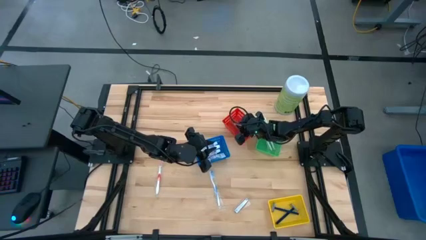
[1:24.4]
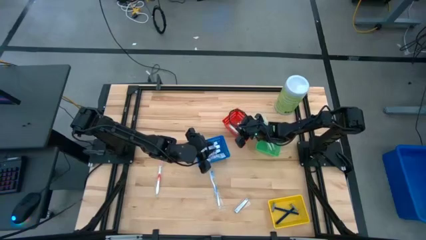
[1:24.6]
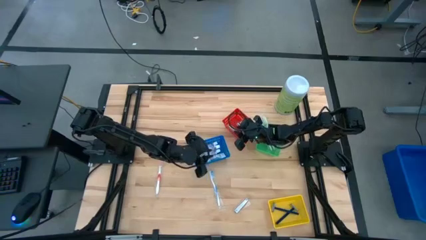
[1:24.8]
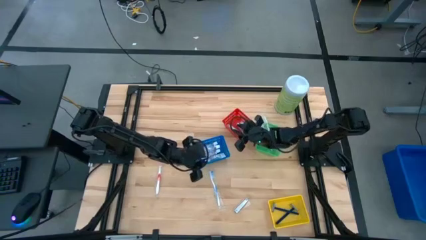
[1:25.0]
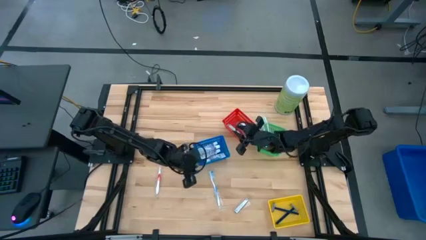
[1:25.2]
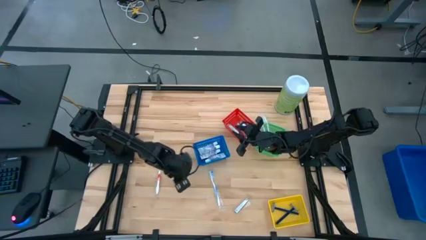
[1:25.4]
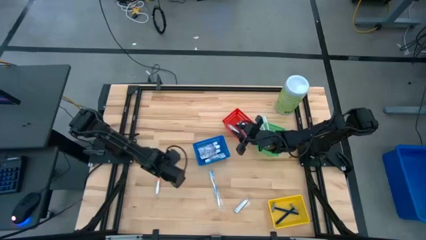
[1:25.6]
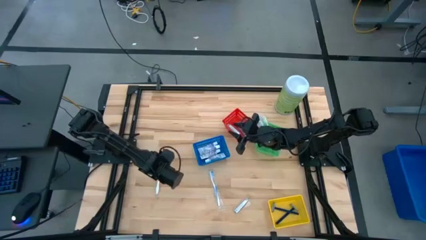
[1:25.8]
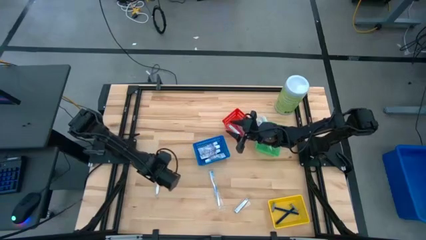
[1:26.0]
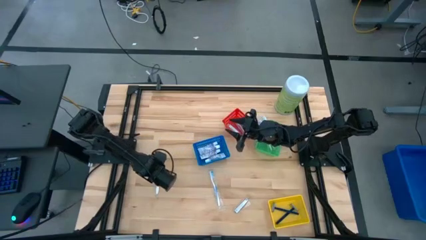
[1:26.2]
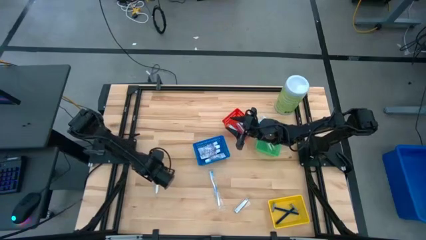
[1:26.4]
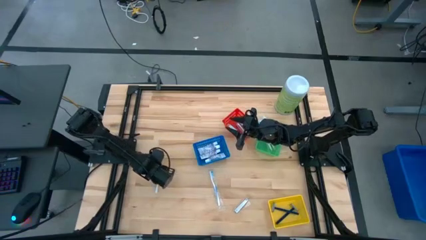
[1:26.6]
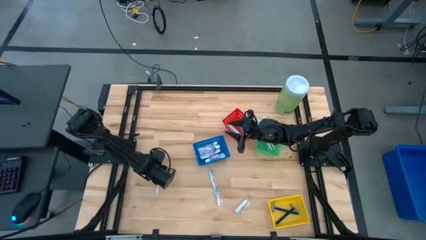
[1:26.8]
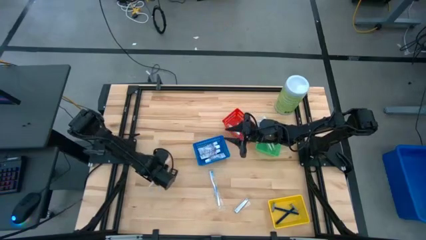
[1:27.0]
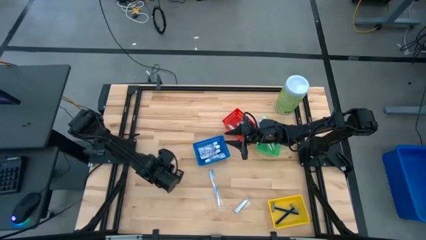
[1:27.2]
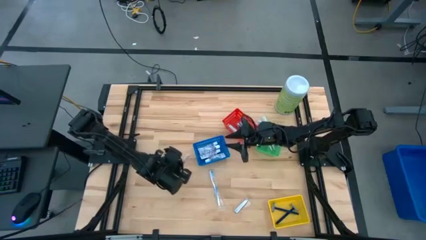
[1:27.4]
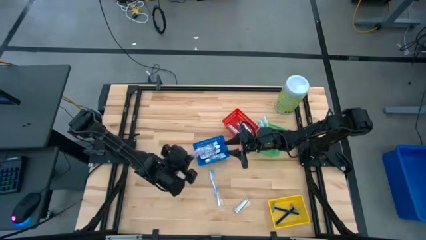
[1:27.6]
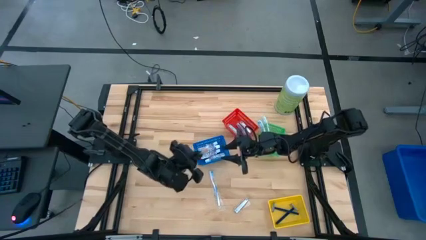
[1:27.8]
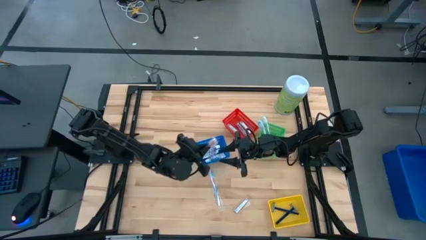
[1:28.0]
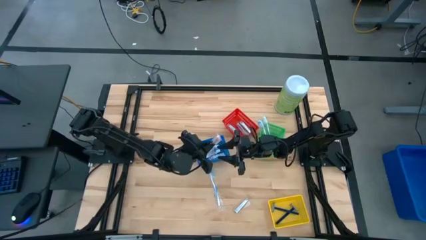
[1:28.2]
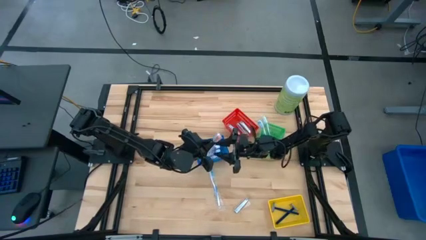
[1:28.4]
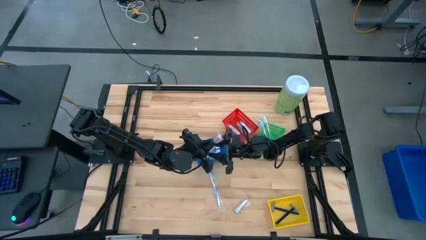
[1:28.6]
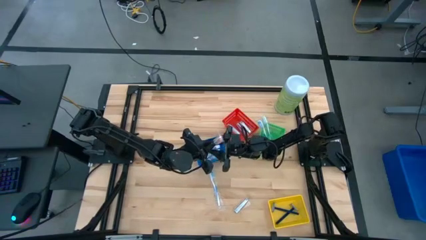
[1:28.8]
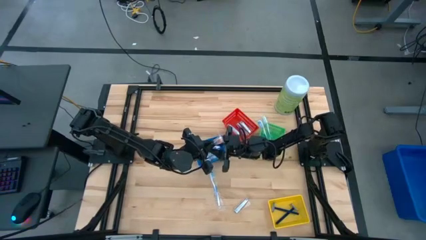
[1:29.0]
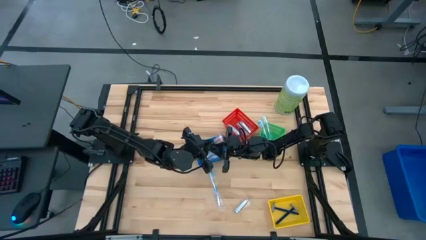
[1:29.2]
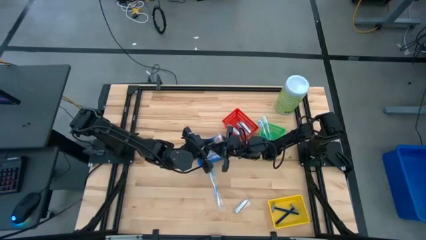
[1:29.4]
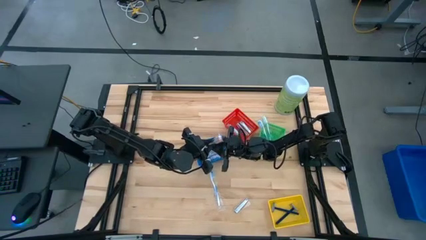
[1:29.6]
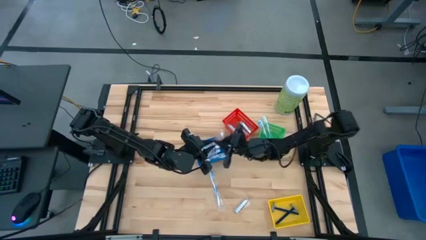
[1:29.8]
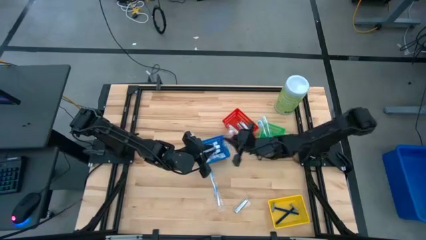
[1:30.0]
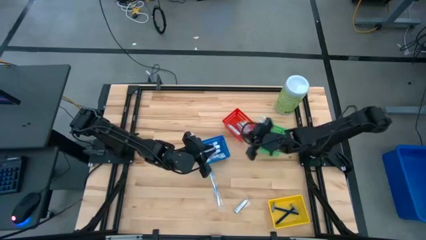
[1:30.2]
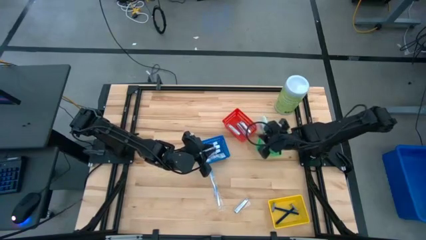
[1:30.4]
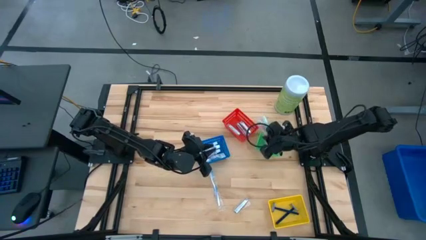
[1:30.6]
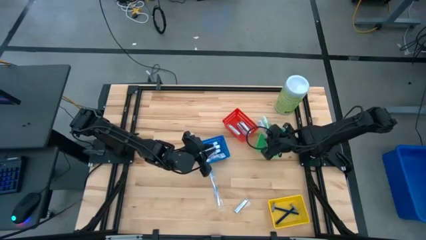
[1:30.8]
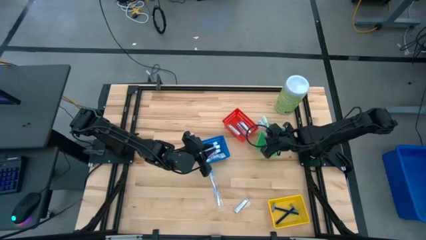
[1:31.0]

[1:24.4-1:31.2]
Task: Pick & Place Travel size toiletries
Put the orange toothbrush into the green bin

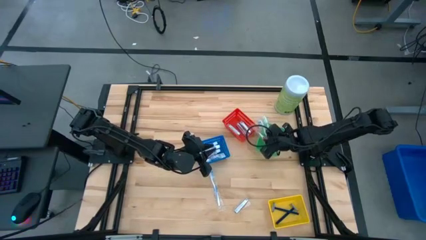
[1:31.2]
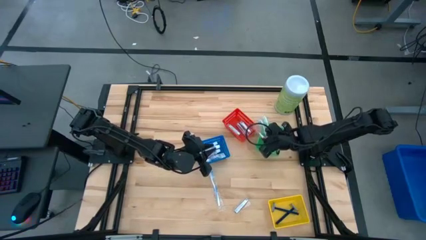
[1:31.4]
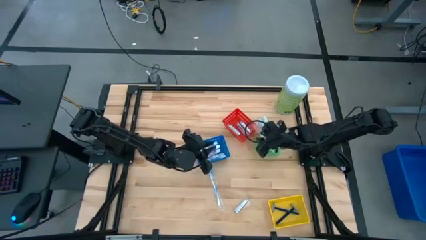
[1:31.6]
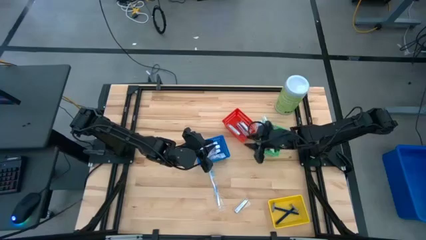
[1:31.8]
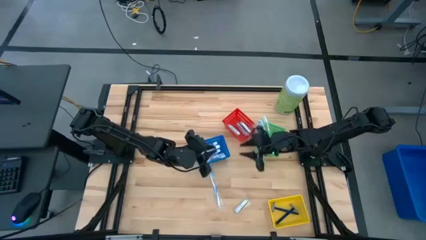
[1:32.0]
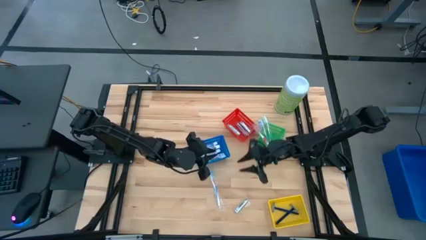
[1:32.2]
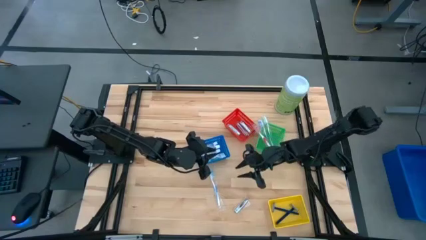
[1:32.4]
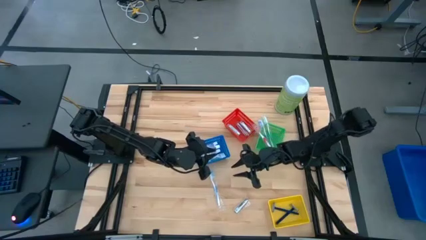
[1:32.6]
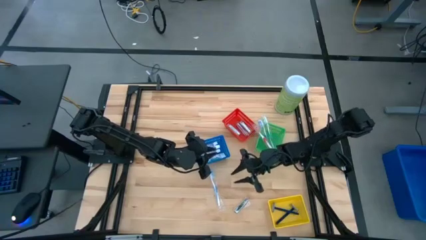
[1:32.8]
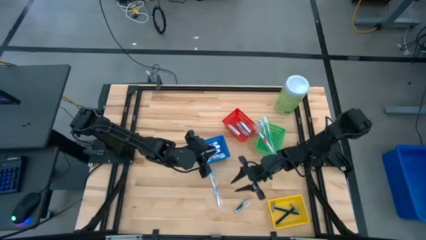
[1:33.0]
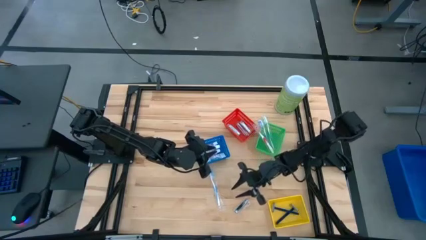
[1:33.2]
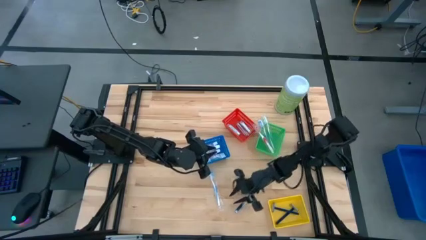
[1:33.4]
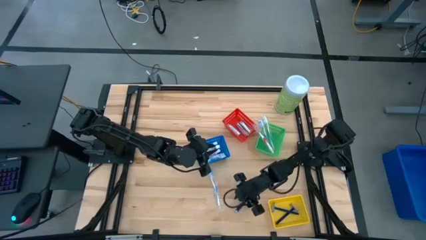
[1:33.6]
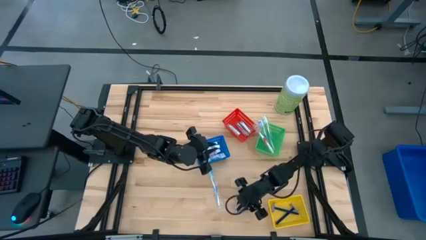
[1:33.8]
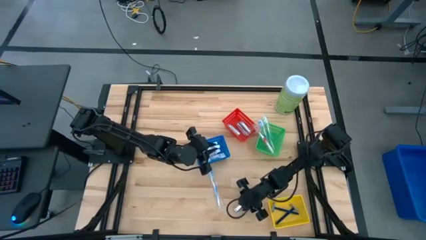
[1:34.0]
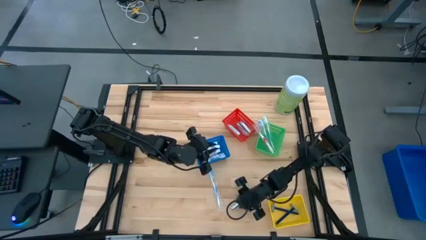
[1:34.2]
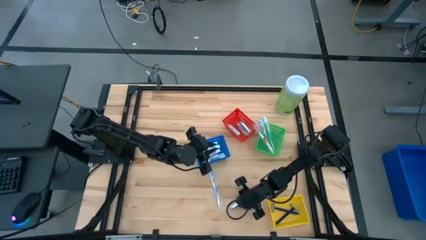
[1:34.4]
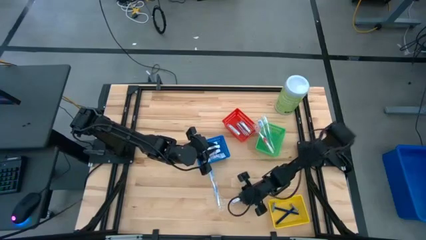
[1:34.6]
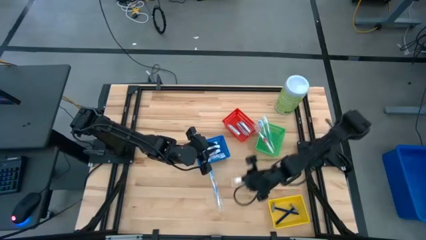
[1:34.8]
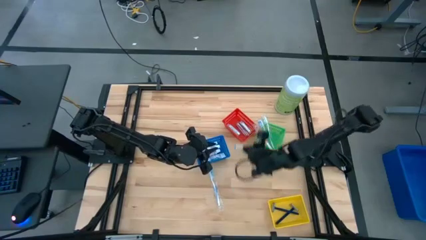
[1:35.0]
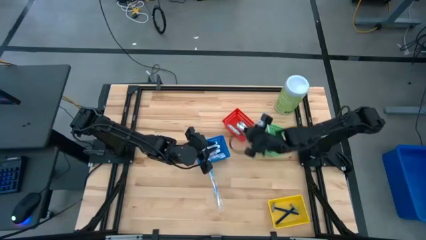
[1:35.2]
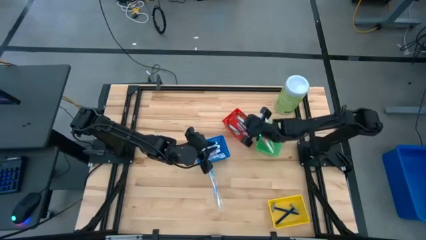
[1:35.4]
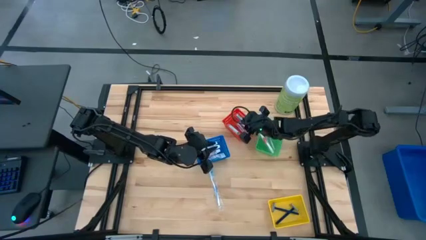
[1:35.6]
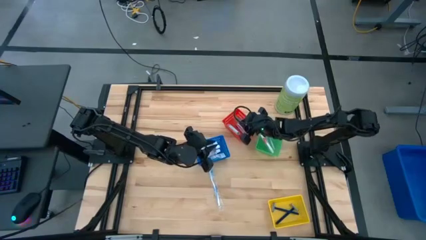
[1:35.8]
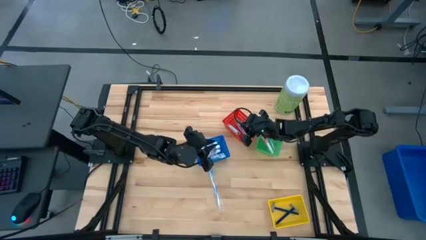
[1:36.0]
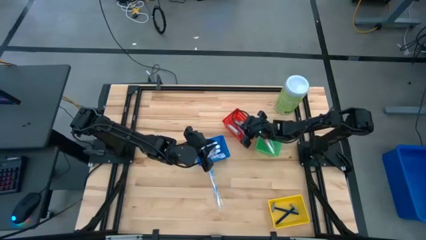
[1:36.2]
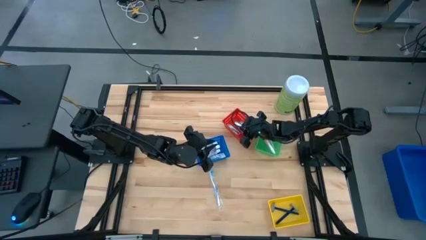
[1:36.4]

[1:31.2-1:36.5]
Put the silver nail cutter into the red bin

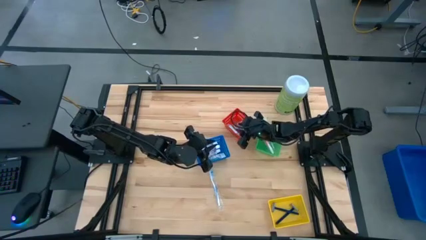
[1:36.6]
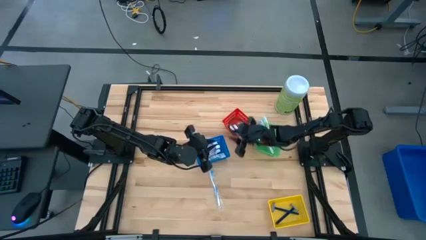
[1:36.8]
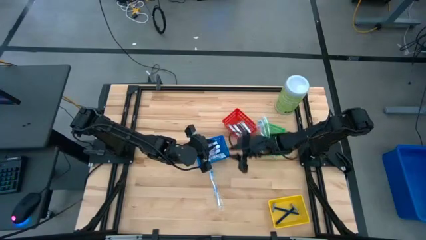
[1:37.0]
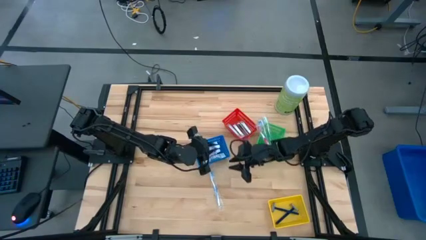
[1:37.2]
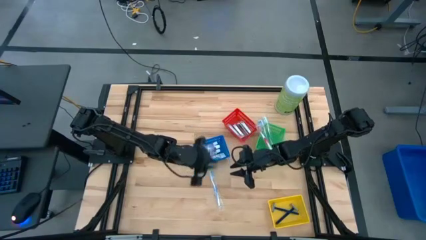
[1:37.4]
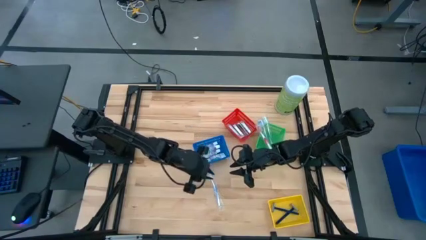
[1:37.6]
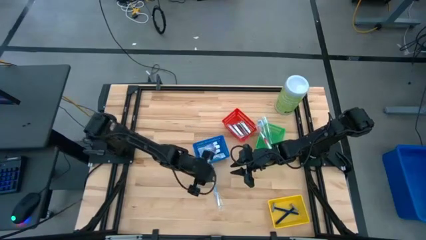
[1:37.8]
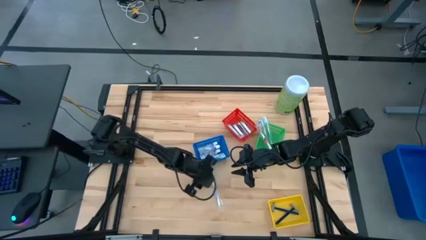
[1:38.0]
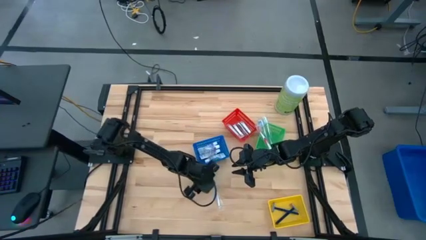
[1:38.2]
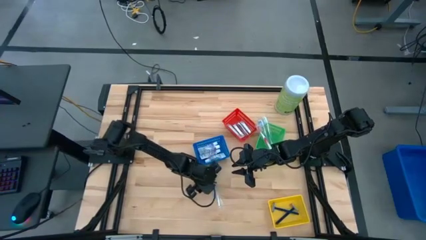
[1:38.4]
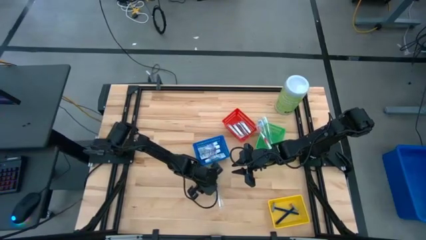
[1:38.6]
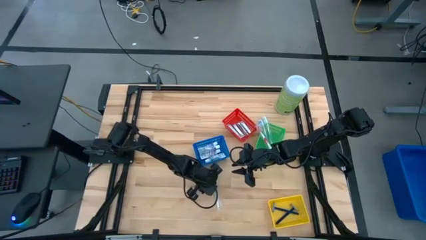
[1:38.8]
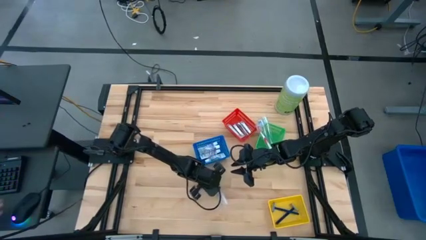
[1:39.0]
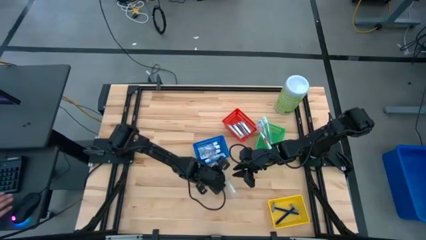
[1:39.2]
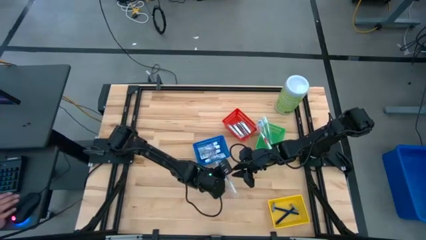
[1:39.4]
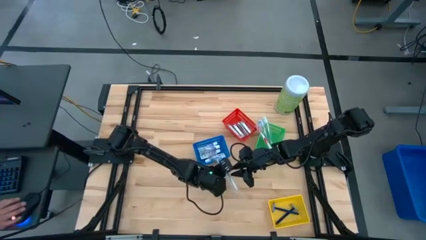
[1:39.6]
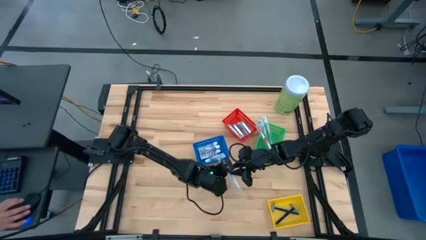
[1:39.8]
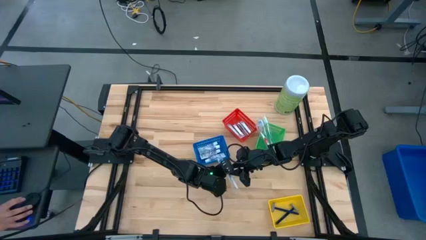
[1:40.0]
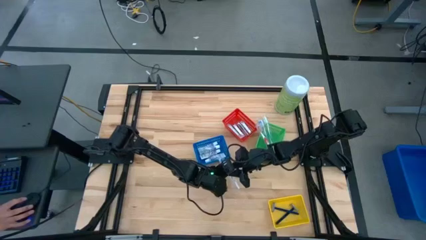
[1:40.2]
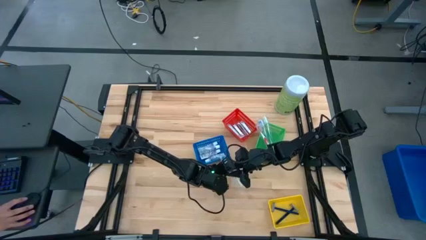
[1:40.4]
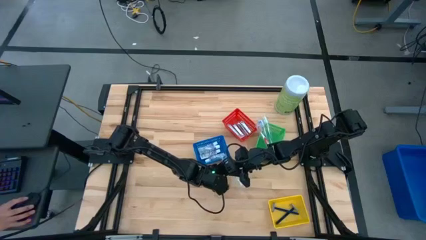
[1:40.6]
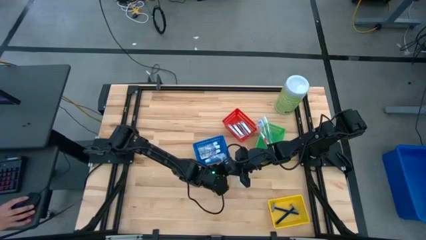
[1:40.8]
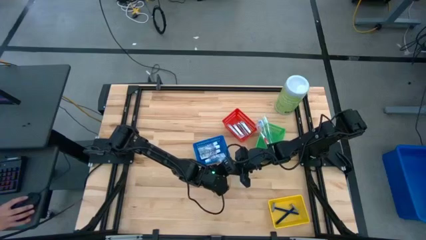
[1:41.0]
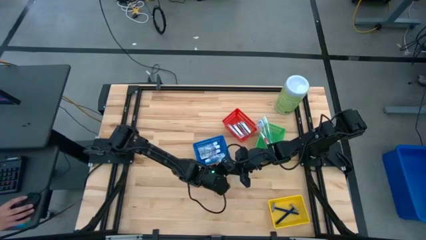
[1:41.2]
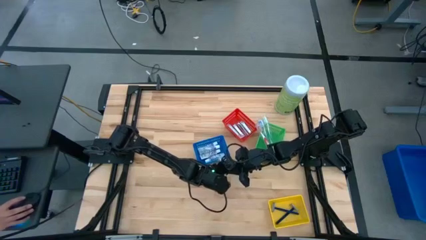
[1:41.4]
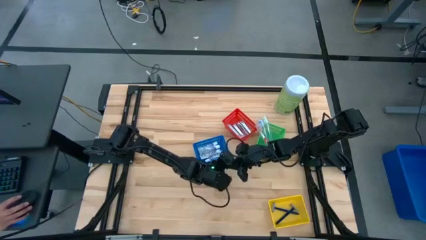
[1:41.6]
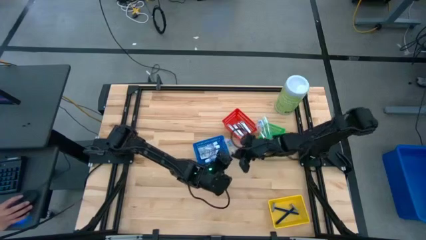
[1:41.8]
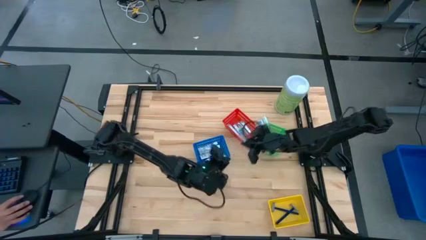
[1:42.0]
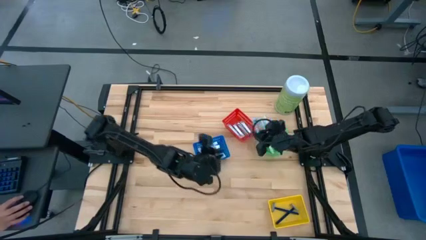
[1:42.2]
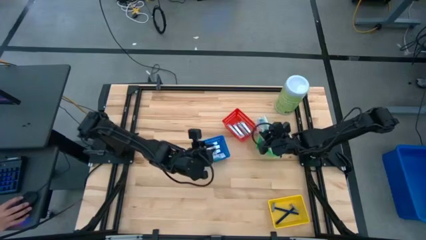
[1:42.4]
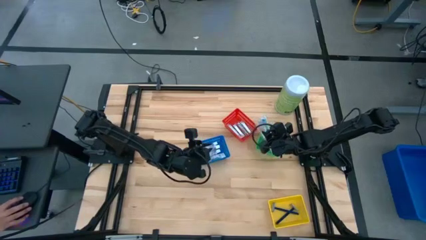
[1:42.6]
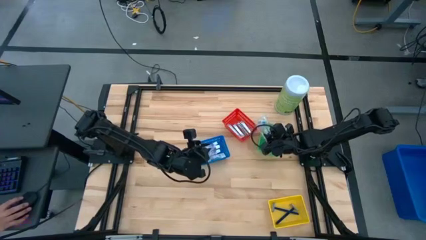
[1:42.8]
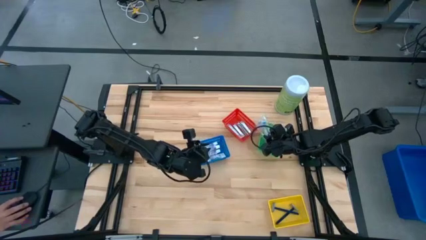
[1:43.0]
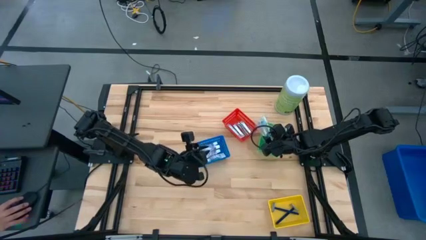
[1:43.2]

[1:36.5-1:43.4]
Put the blue toothbrush into the green bin
